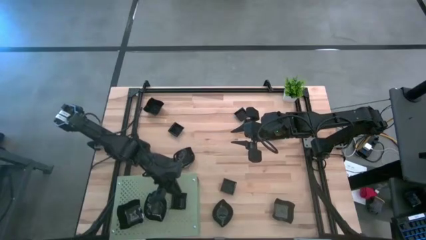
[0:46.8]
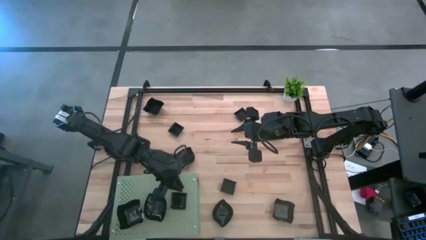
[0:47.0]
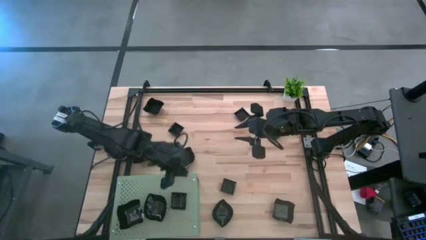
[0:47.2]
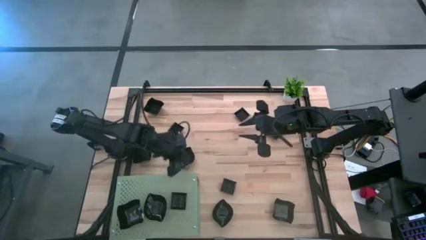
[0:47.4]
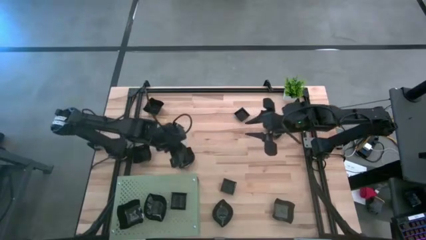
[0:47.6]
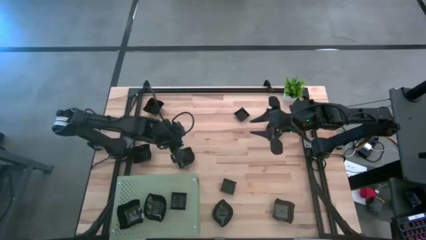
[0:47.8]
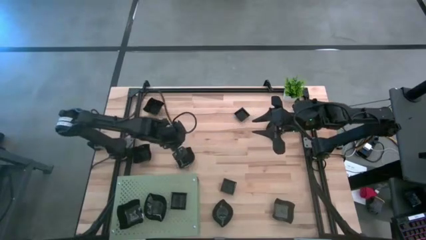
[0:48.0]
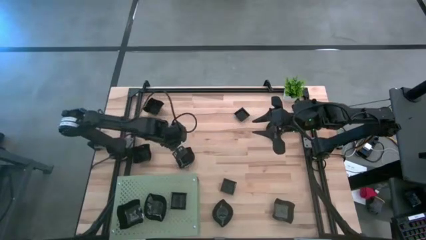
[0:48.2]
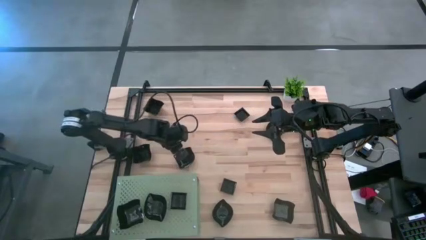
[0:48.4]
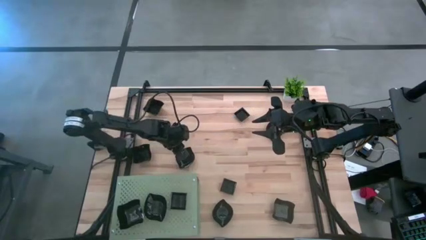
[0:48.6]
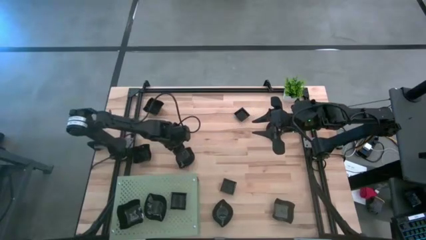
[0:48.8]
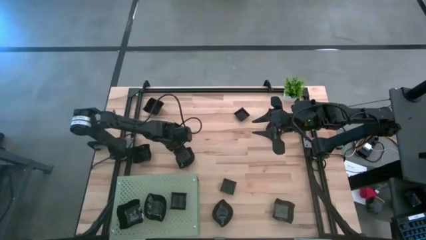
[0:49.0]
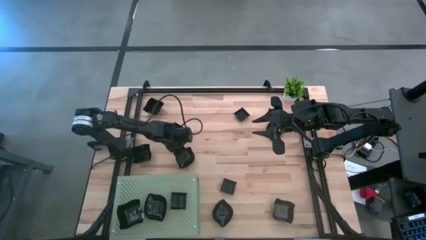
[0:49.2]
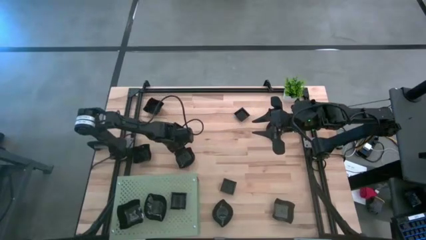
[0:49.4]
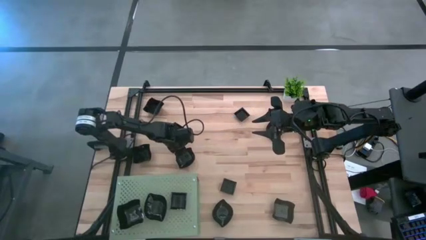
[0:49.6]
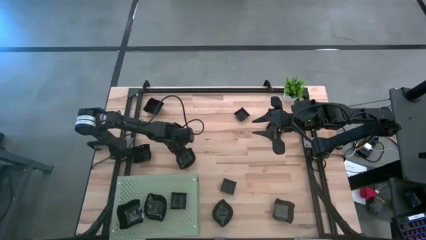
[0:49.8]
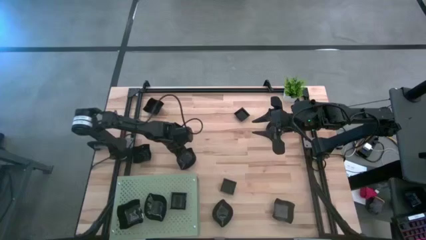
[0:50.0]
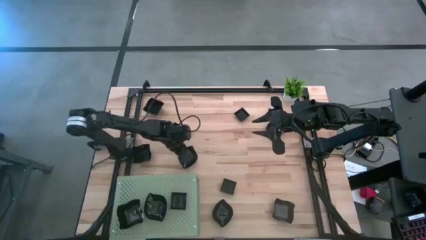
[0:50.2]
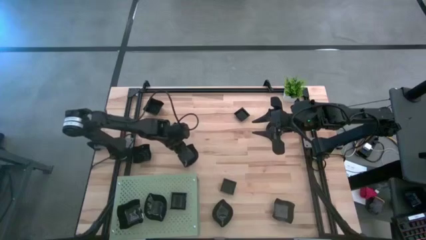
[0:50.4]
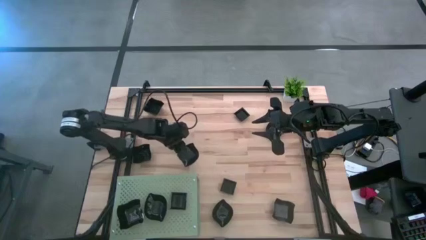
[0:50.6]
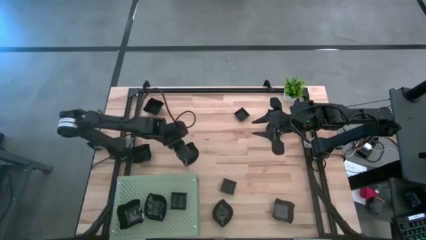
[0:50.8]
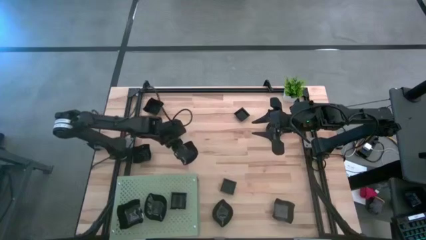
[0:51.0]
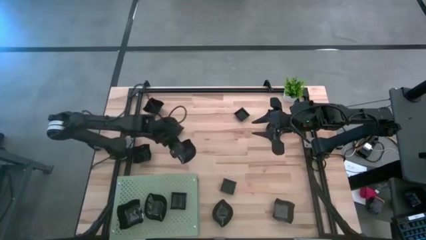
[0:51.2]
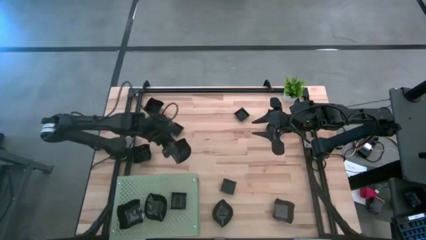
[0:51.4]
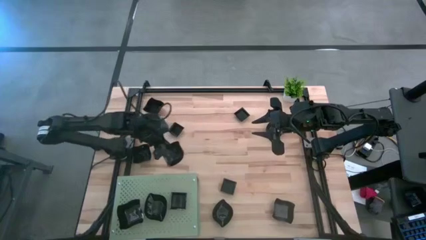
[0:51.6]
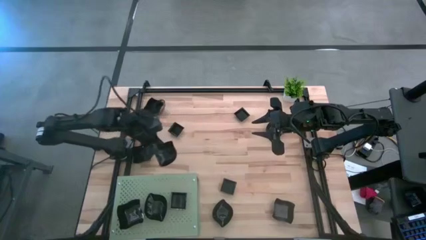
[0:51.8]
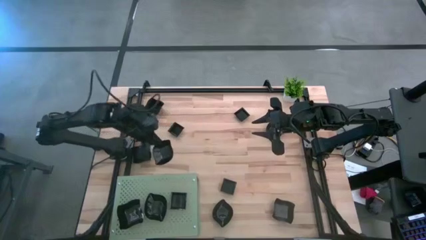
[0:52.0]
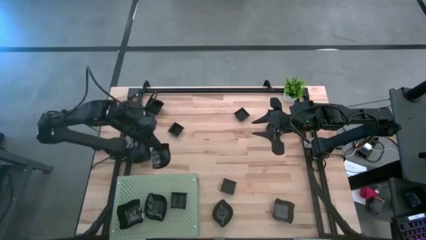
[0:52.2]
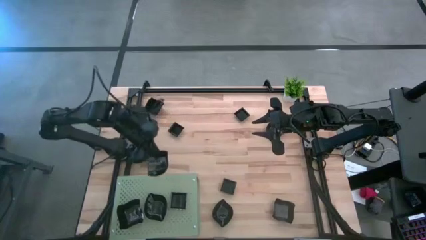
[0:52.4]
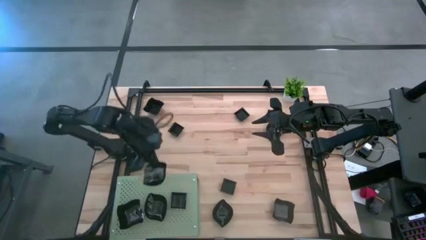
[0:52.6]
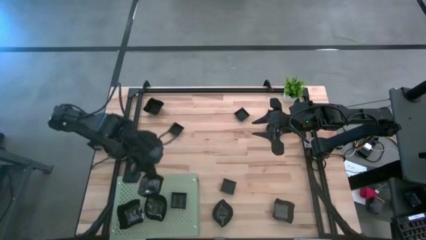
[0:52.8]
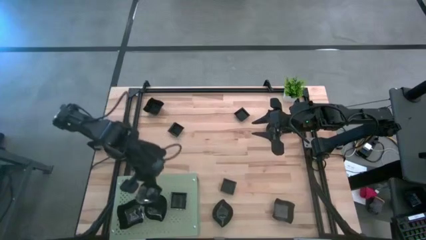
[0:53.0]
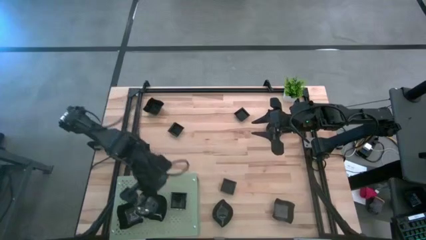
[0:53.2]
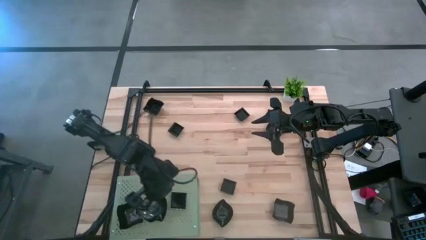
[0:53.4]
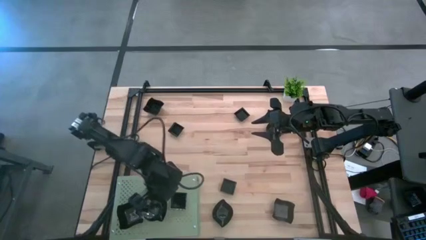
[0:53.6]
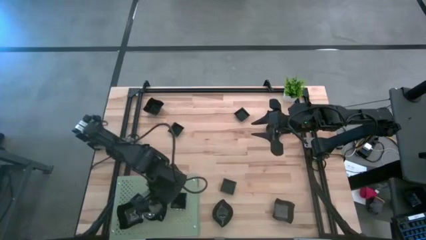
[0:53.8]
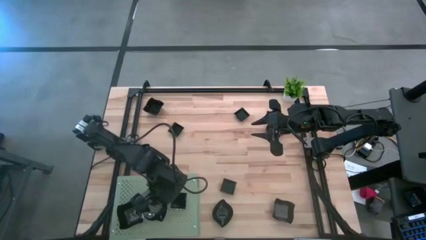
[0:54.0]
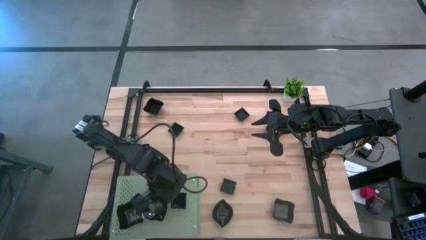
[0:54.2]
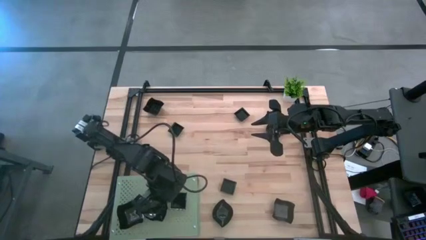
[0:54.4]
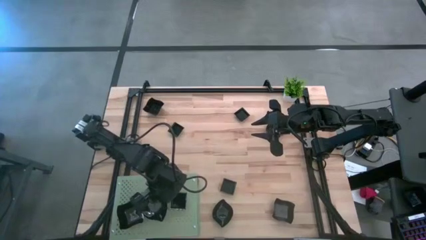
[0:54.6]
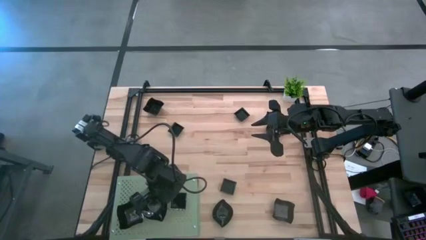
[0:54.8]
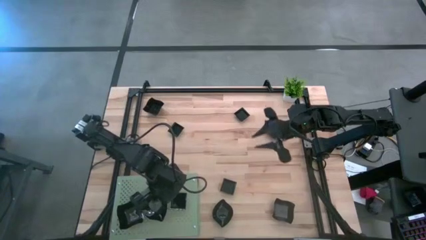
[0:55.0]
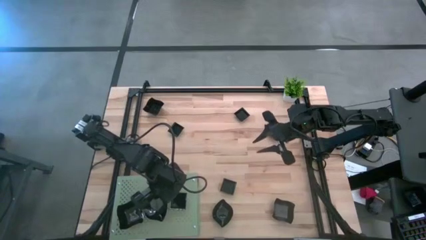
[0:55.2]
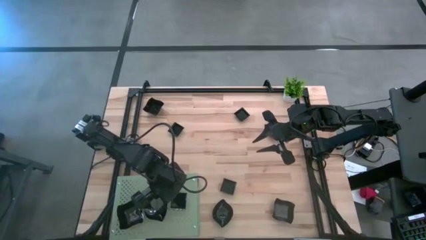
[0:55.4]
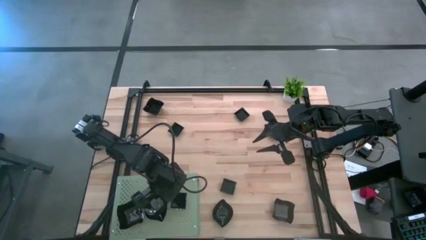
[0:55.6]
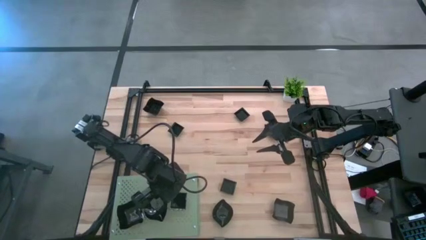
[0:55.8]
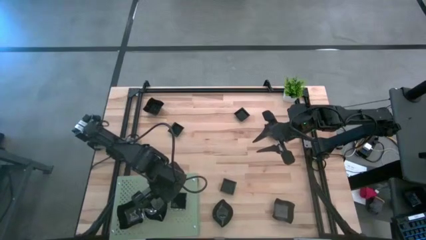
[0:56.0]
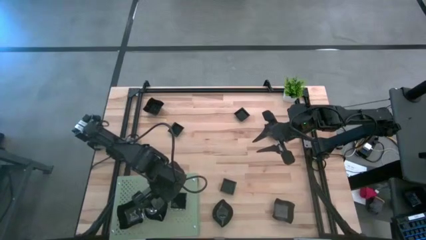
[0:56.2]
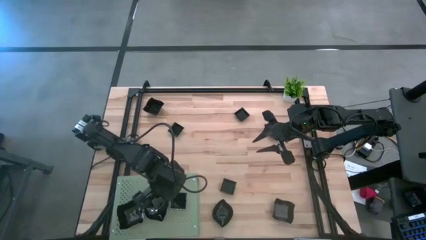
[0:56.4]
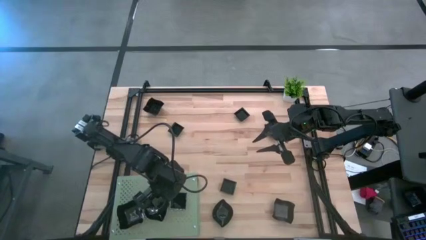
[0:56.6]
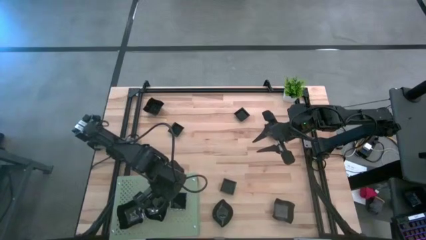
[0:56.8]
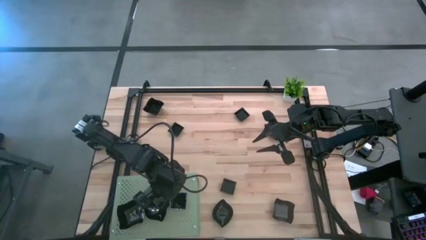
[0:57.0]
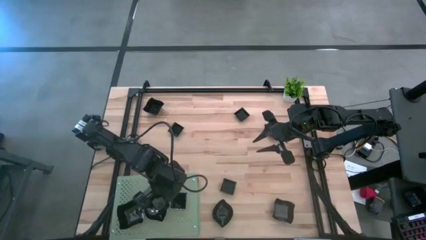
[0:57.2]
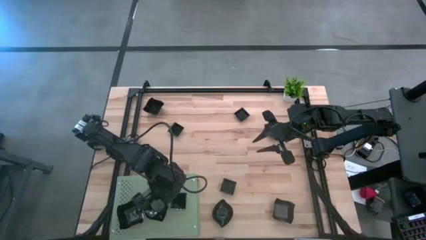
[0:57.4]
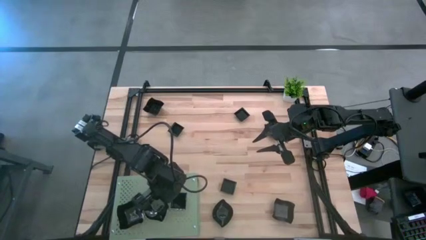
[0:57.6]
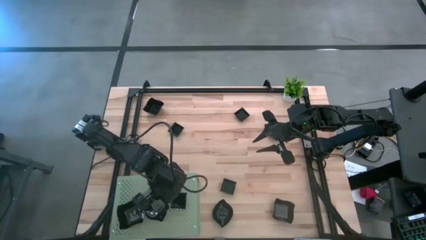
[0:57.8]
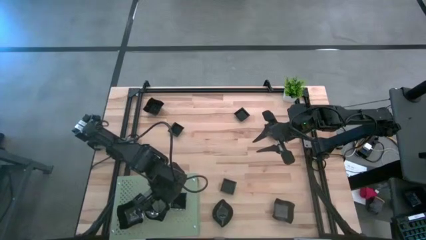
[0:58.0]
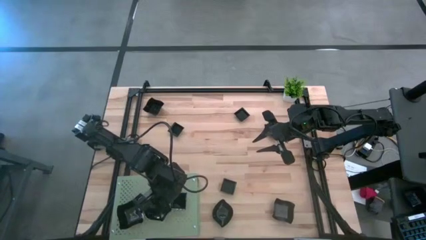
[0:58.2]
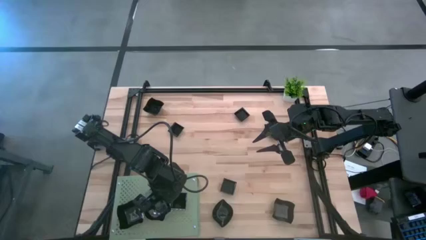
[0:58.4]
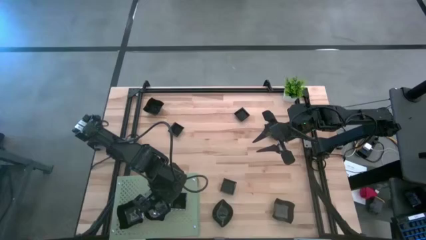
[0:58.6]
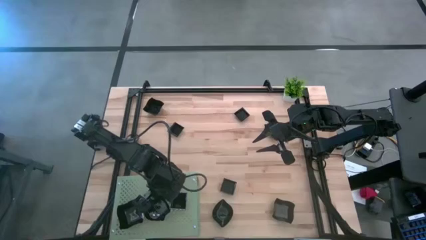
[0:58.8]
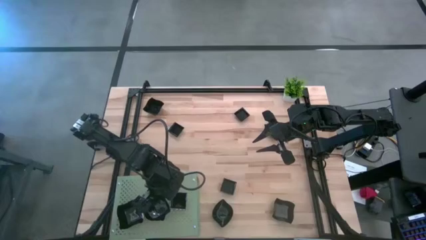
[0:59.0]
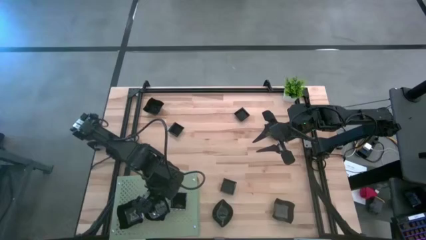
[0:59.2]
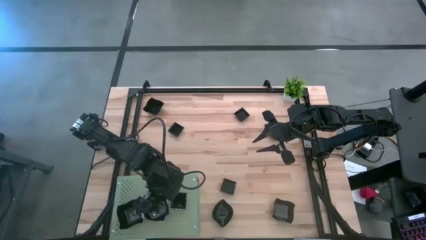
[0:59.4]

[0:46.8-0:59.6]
Task: Pick & Place Mini shaped plates
Stack the black leaf shaped plate on top of the other black leaf shaped plate on the shelf

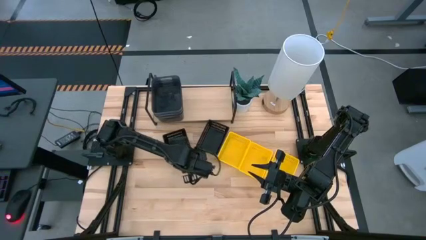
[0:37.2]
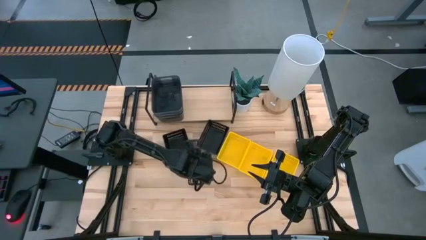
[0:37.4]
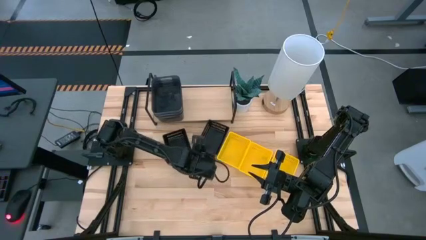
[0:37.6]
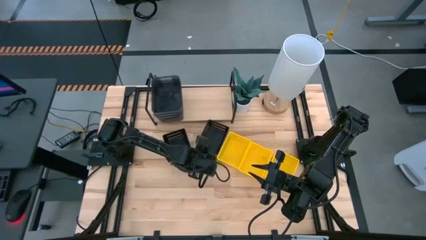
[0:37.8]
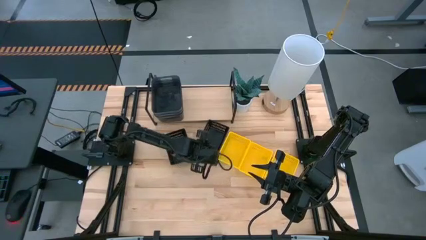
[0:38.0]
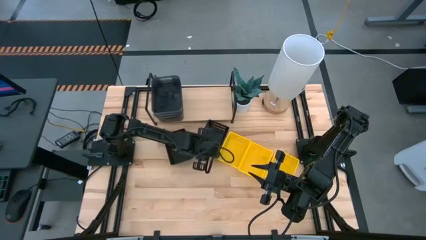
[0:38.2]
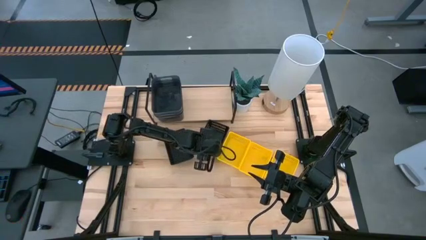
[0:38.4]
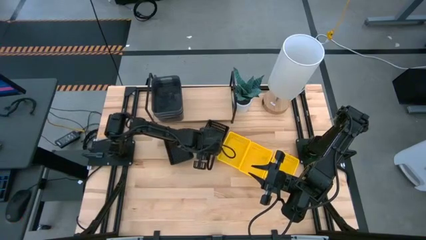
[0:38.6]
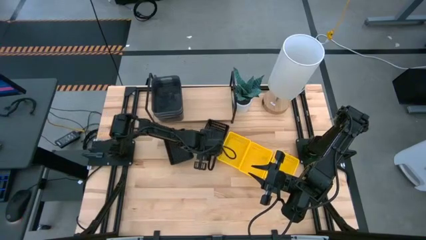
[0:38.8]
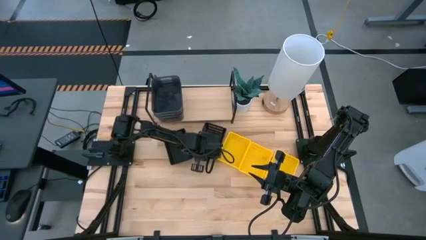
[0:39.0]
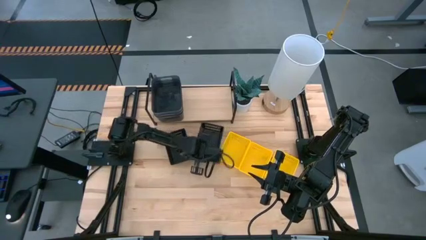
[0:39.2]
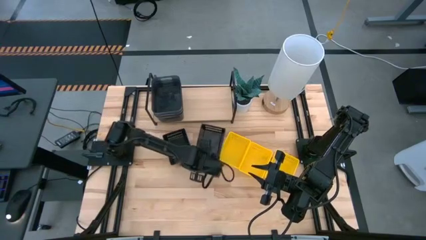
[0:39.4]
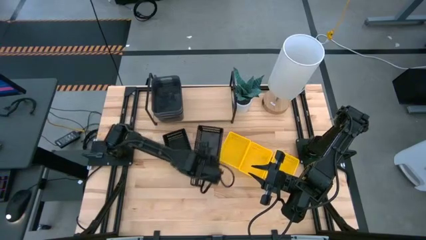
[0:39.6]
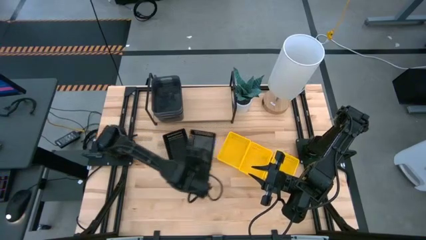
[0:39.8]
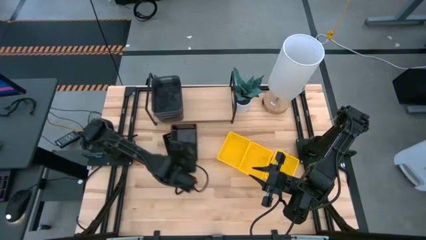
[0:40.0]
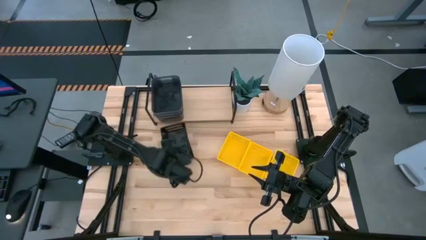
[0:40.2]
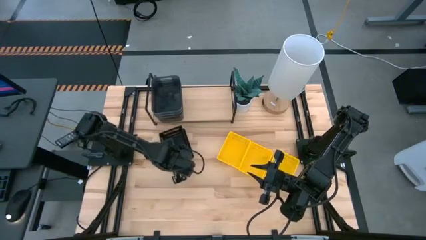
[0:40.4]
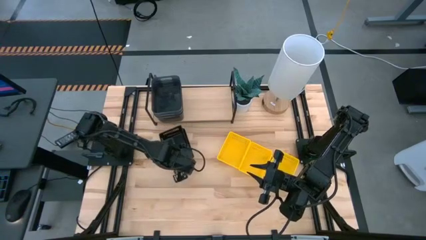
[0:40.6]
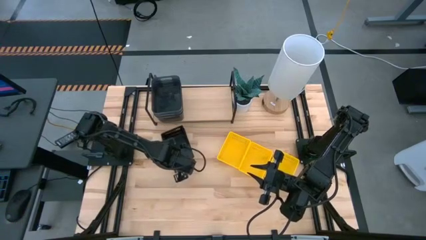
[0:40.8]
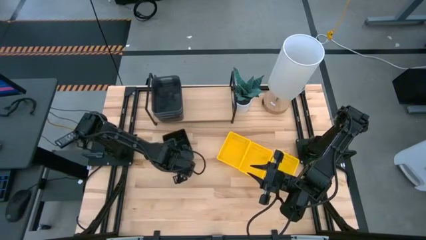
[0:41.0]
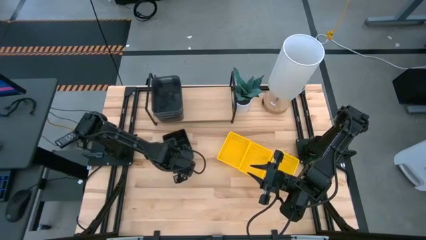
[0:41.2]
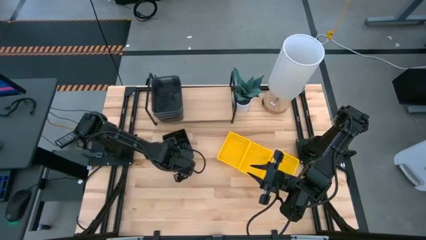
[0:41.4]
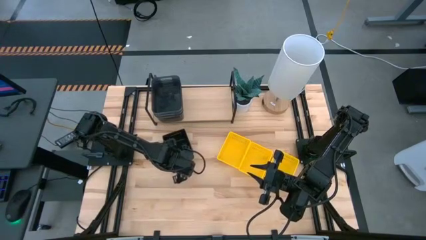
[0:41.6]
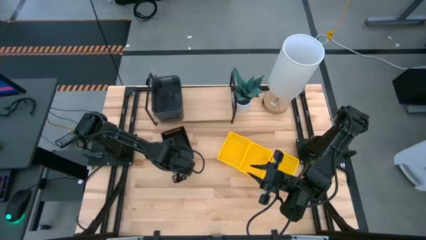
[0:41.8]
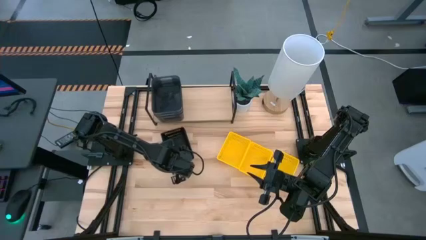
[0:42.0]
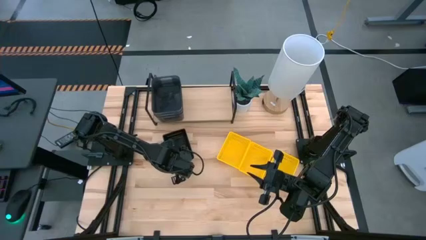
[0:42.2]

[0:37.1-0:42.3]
Task: Stack baskets on shelf by color
Stack the black basket on top of the stacked black basket
